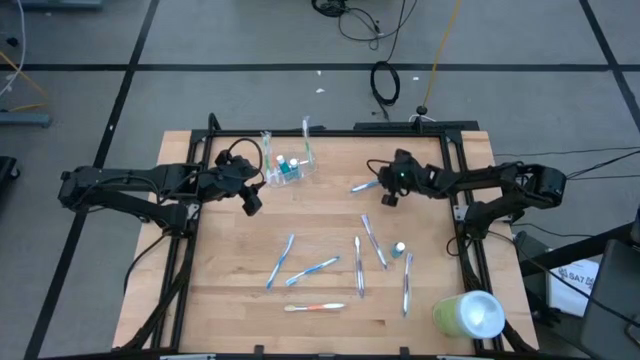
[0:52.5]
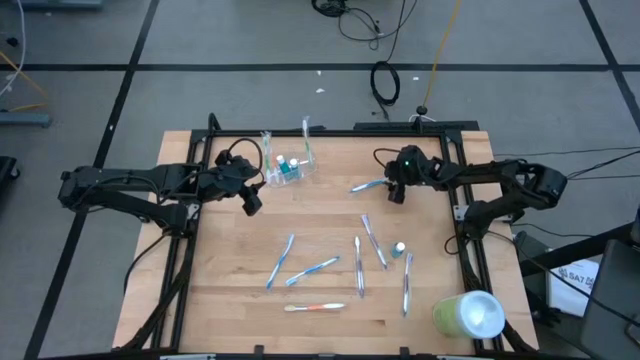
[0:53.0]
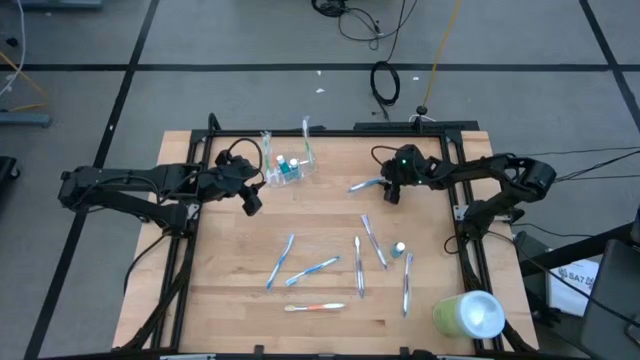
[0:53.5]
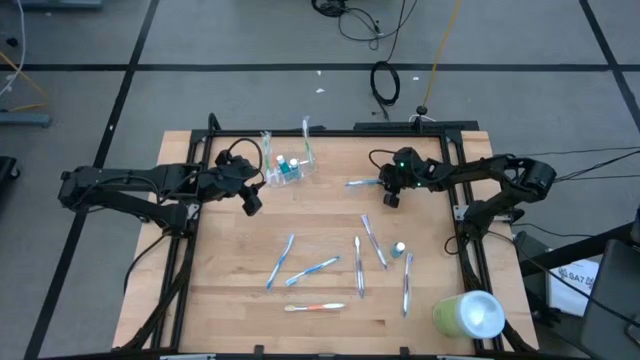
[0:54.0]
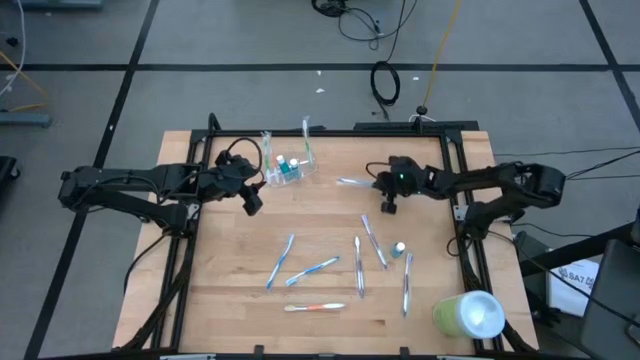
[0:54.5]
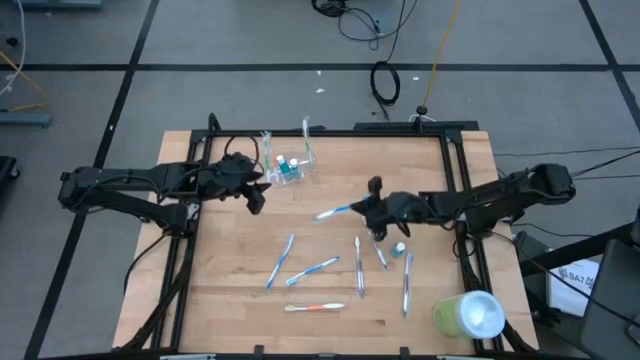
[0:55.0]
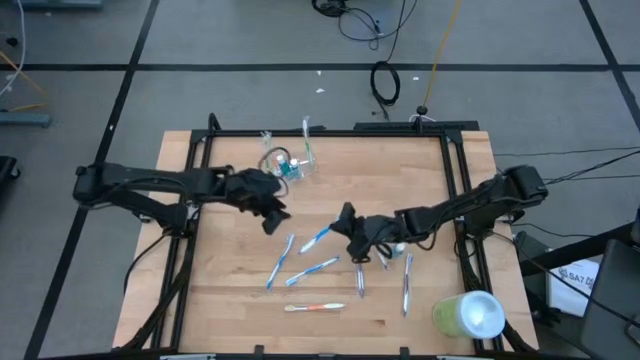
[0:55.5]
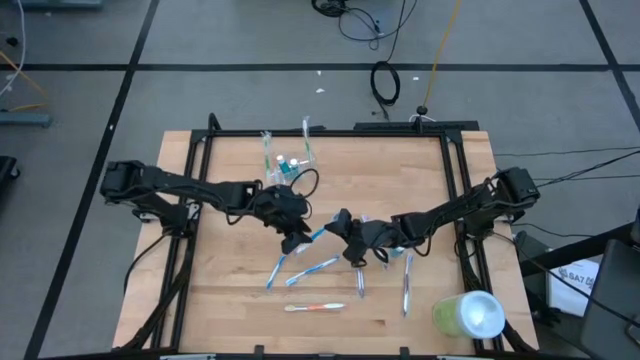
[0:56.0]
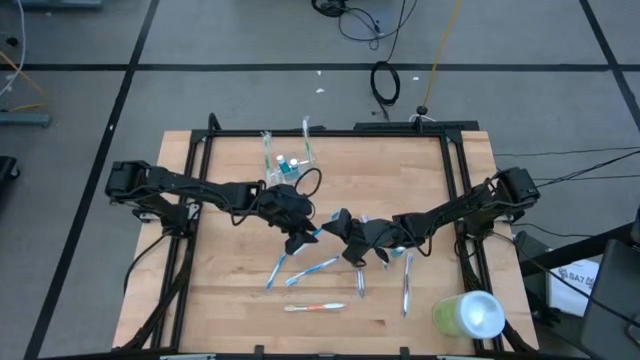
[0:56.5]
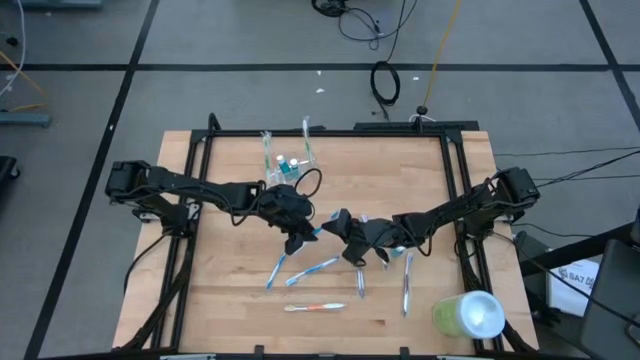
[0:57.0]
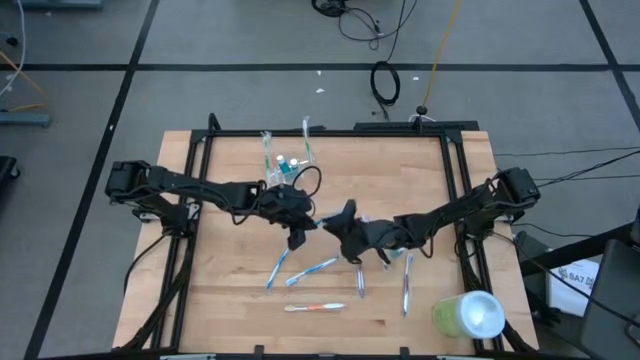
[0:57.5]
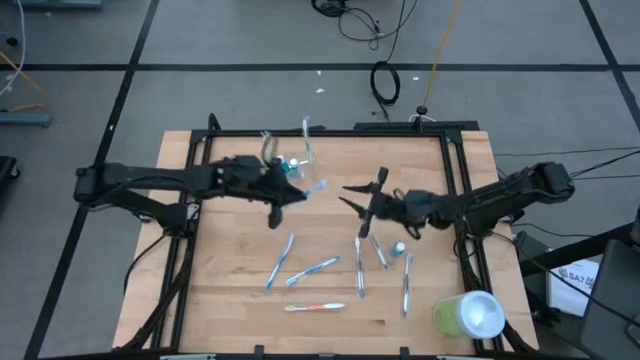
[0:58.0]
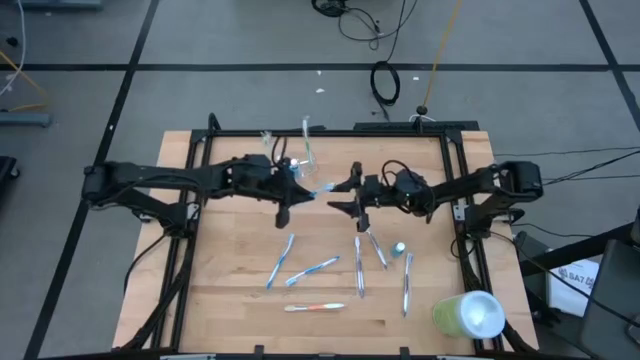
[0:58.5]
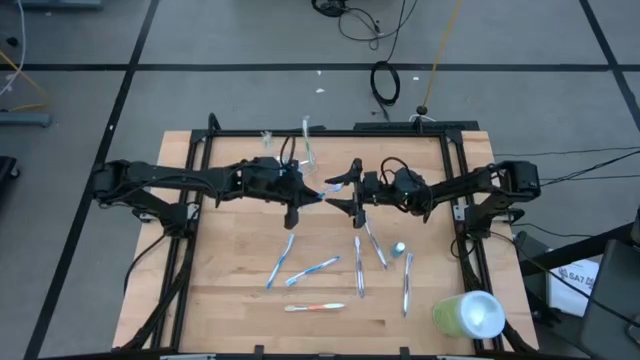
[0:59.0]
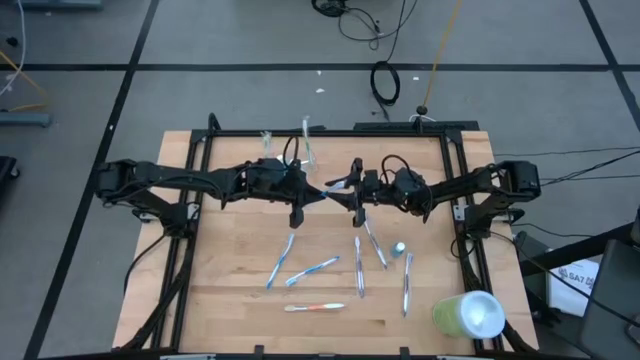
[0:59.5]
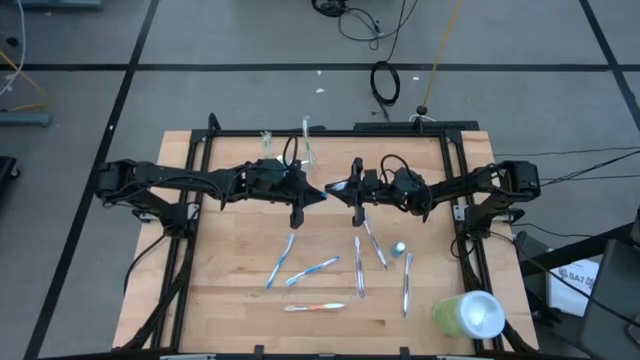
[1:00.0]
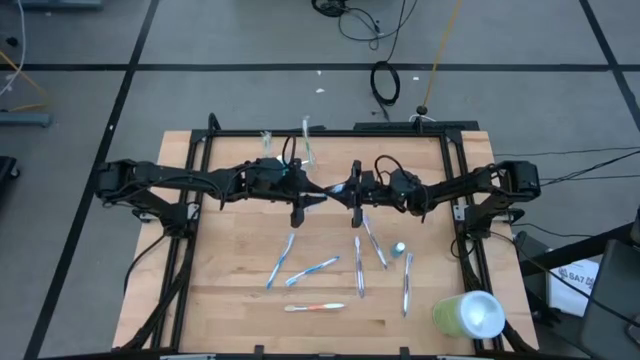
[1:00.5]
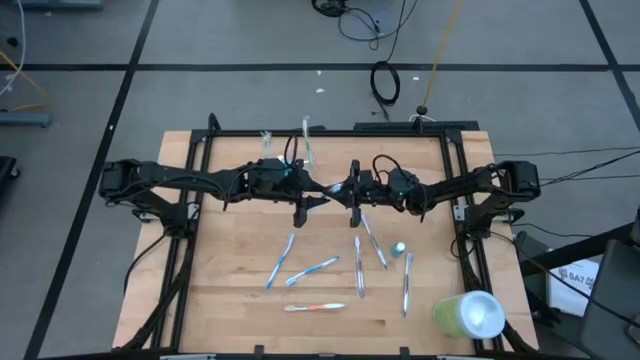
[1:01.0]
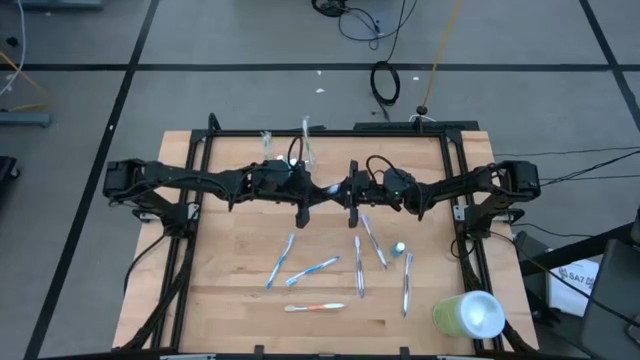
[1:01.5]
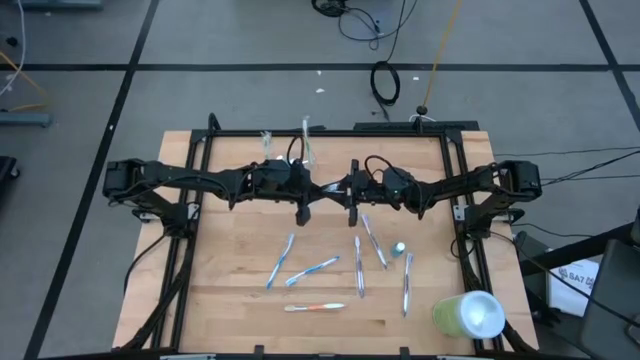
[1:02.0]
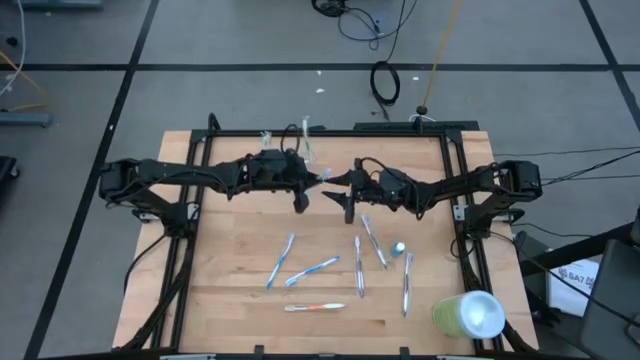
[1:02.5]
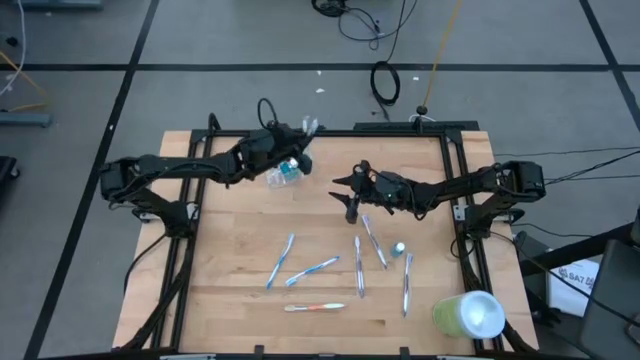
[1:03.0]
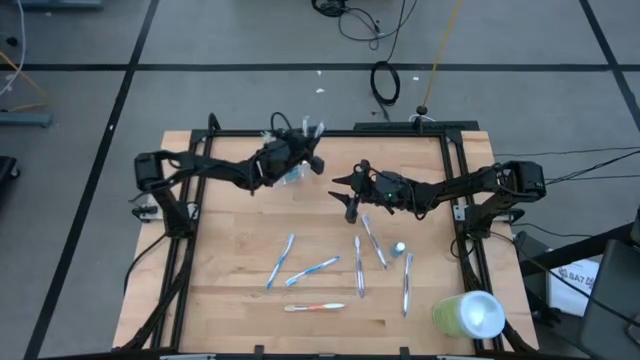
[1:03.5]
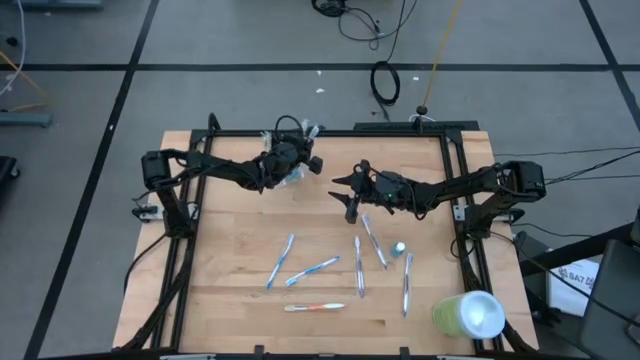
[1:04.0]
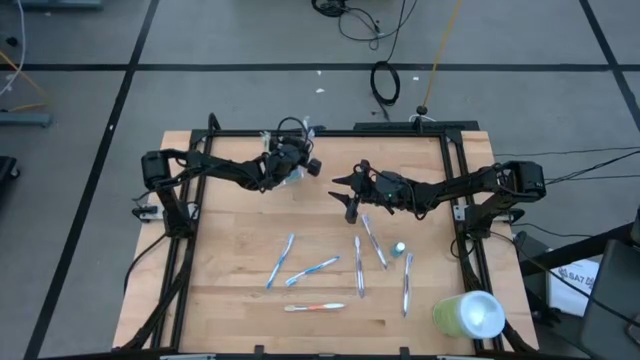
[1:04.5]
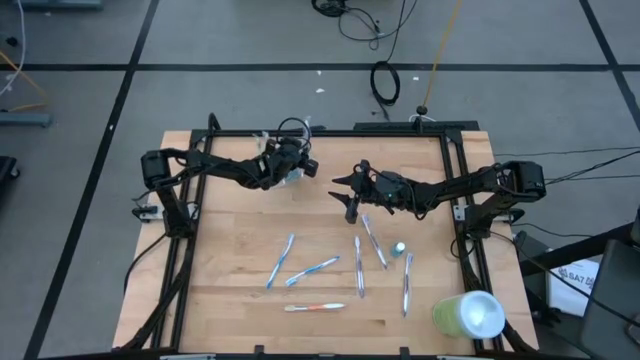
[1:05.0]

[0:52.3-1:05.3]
Task: Pick & Place toothbrushing station
Put the top right blue toothbrush into the transparent organizer

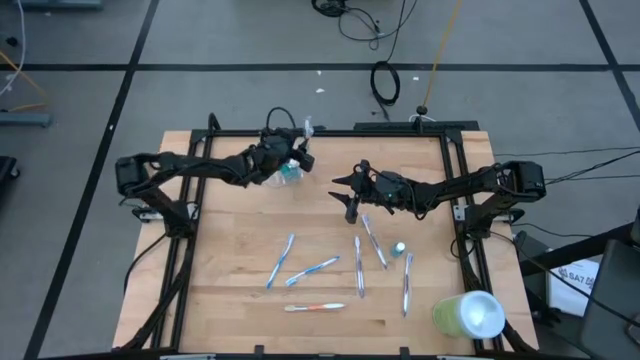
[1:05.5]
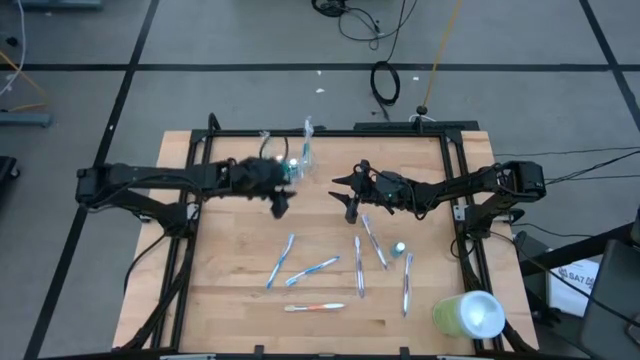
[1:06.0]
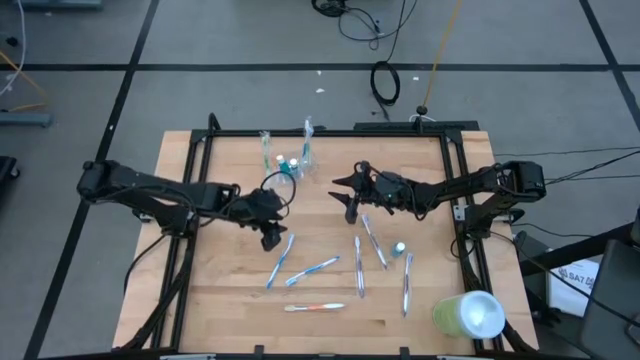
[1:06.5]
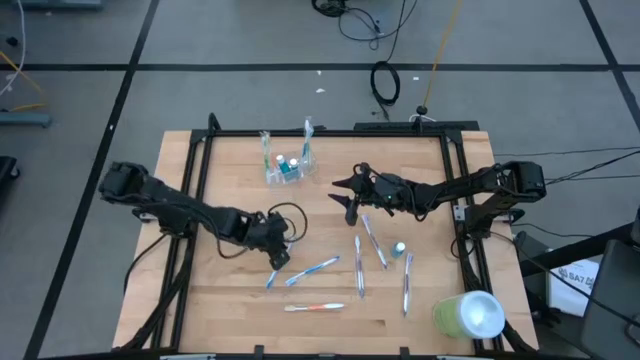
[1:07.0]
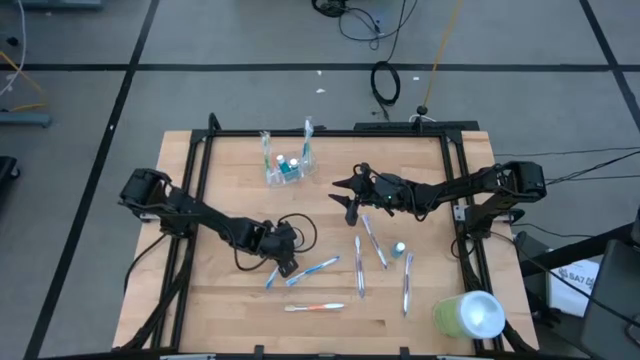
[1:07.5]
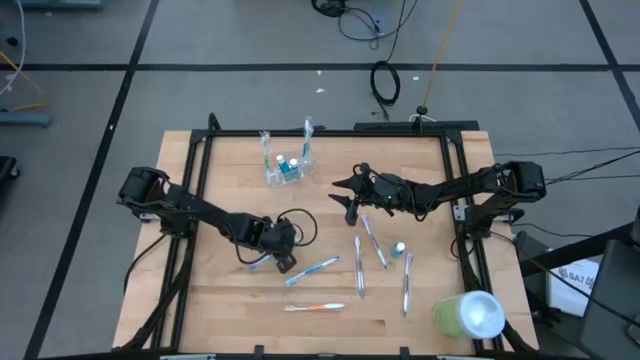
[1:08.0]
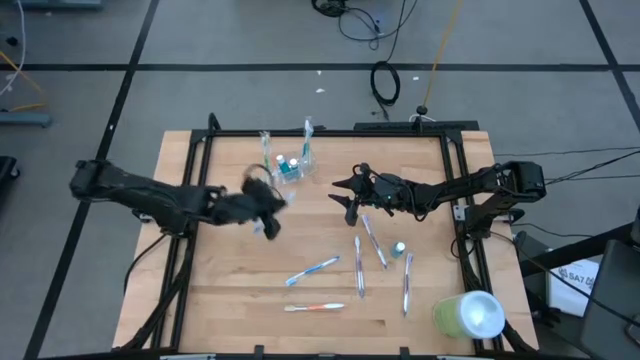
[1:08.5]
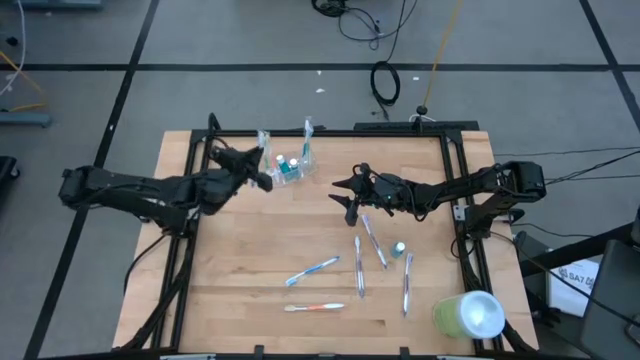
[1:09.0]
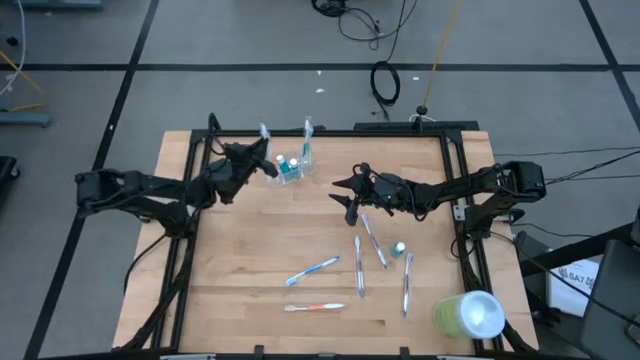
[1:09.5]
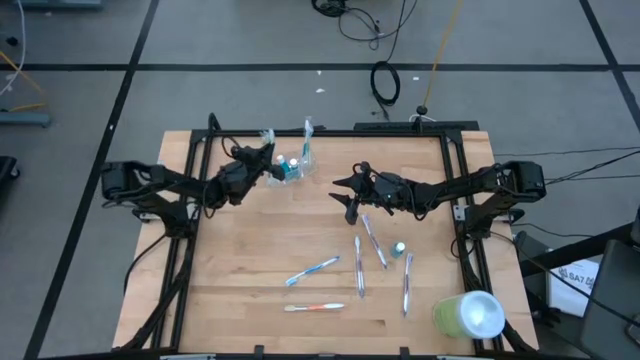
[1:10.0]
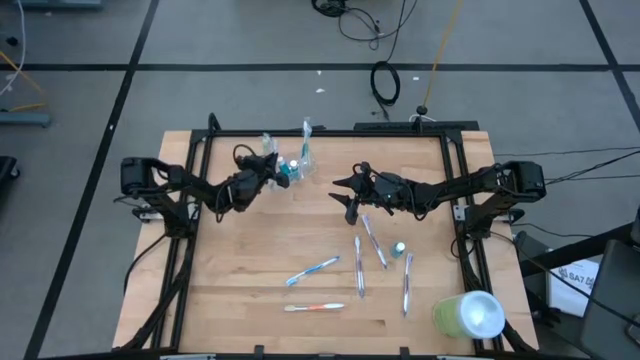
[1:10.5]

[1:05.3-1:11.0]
Put the left blue toothbrush into the transparent organizer

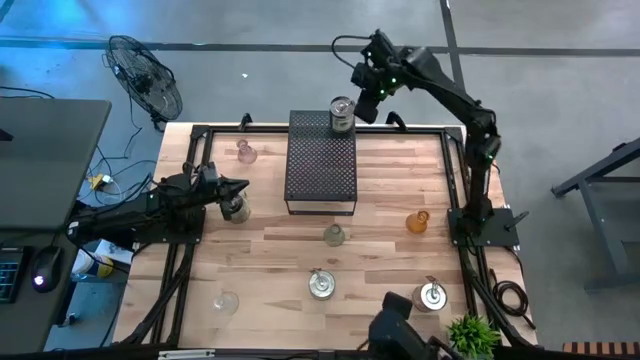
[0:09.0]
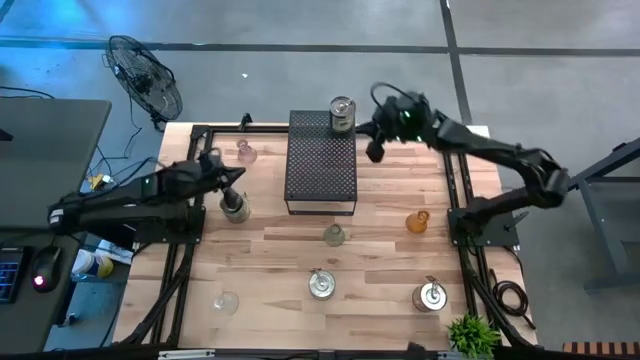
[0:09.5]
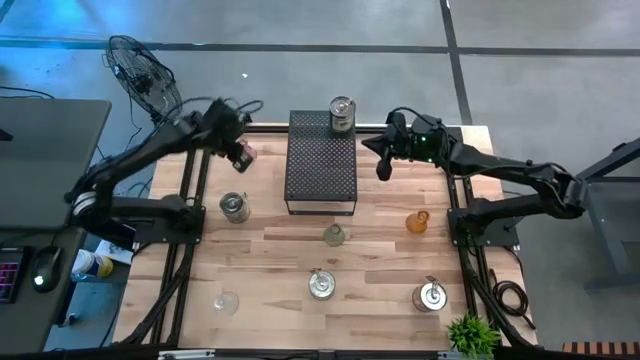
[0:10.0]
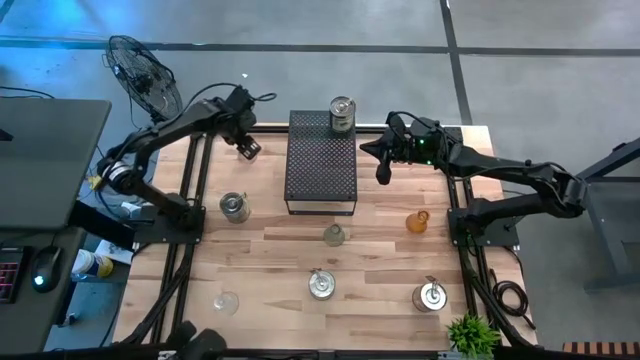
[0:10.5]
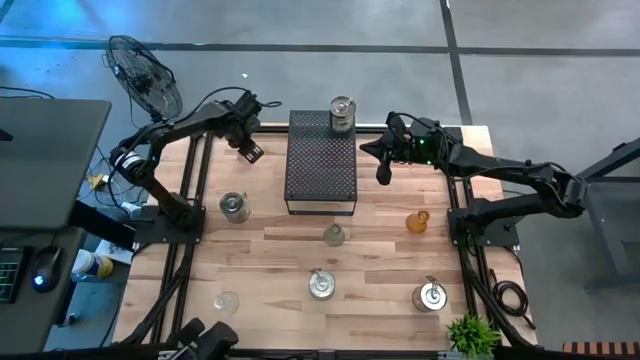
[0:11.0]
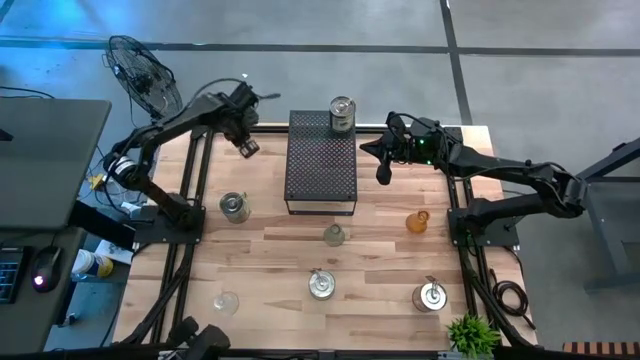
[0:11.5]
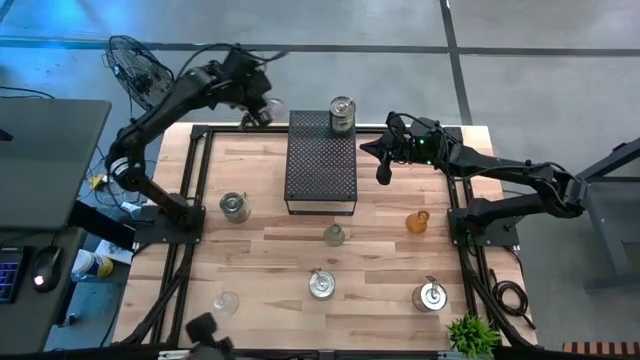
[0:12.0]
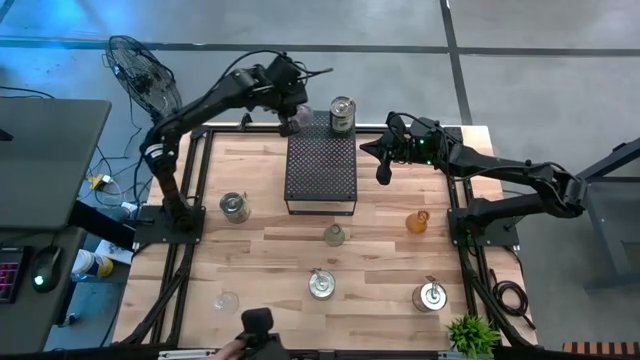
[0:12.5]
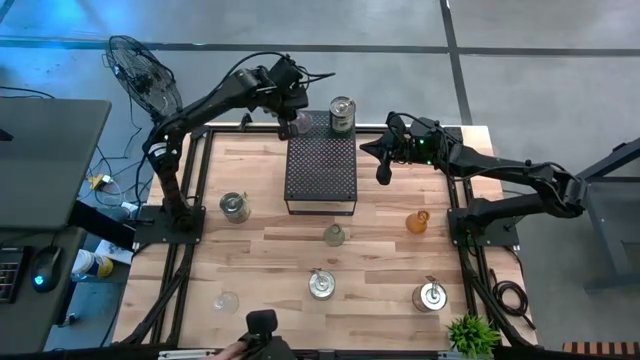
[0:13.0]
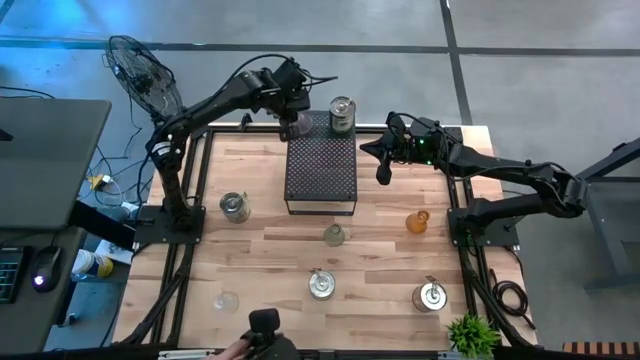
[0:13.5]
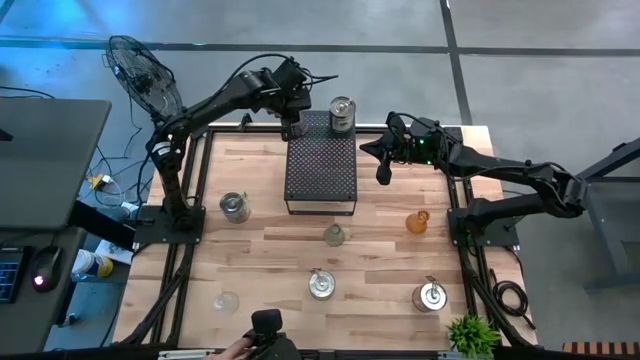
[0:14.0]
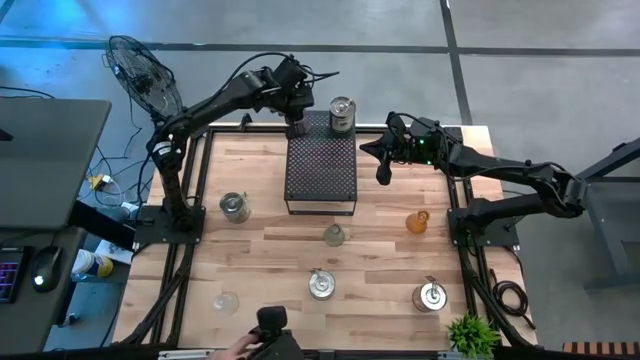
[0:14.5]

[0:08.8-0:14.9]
Task: Pick & Place candle stick holders
Put the pink glass candle holder on the shelf
